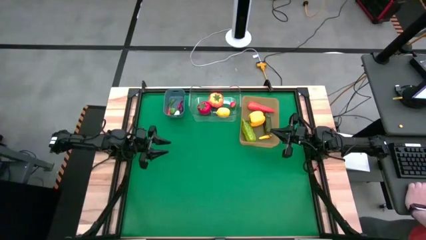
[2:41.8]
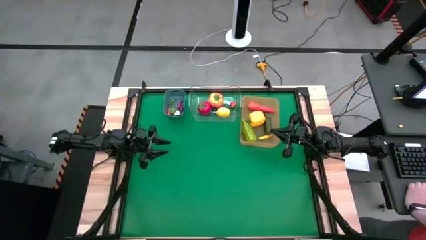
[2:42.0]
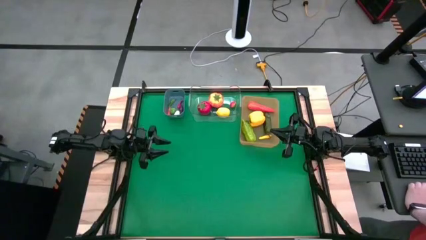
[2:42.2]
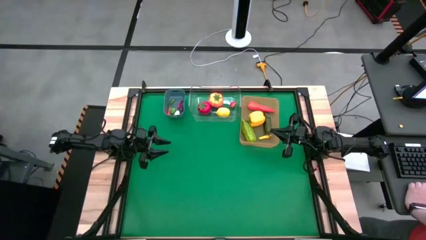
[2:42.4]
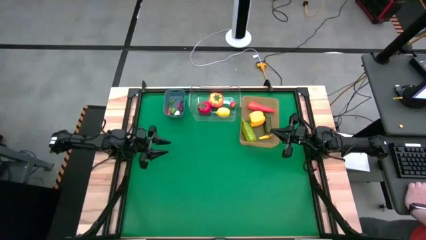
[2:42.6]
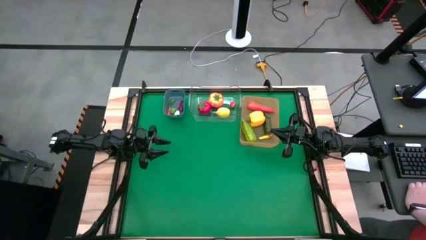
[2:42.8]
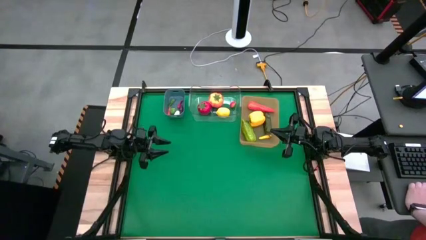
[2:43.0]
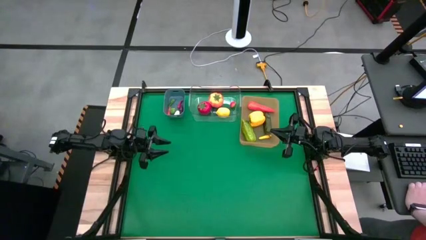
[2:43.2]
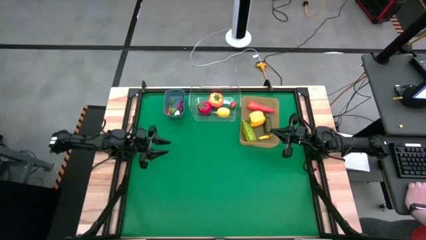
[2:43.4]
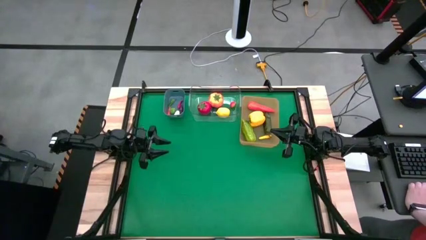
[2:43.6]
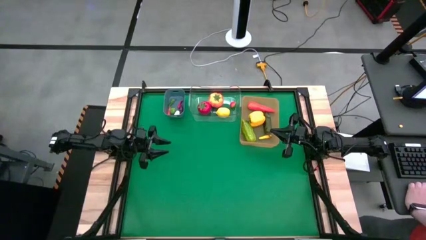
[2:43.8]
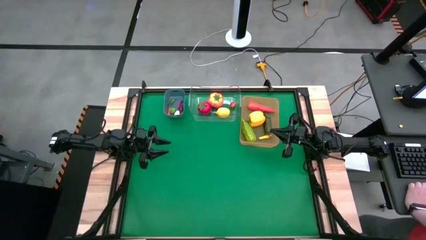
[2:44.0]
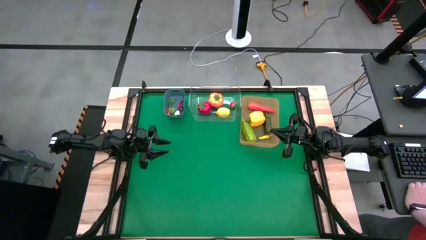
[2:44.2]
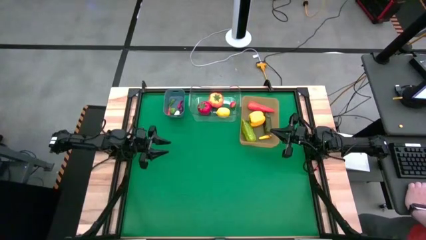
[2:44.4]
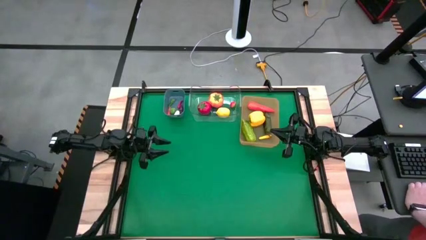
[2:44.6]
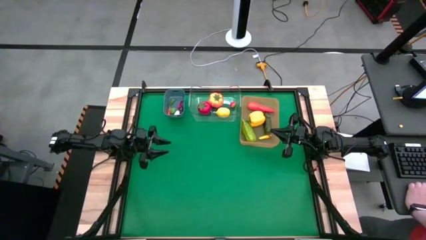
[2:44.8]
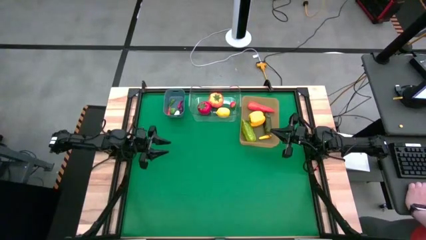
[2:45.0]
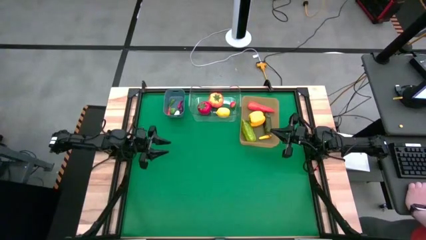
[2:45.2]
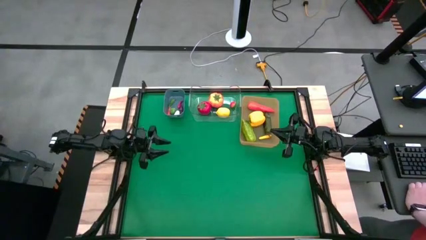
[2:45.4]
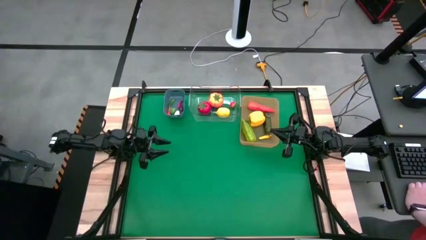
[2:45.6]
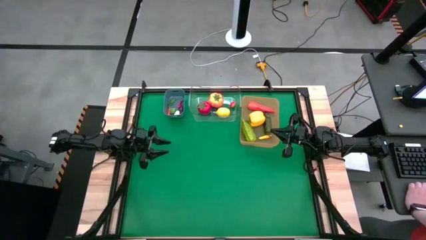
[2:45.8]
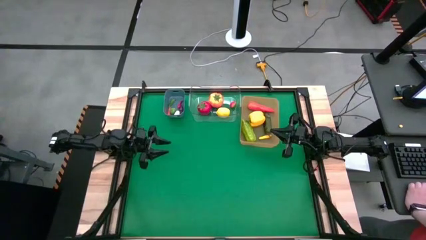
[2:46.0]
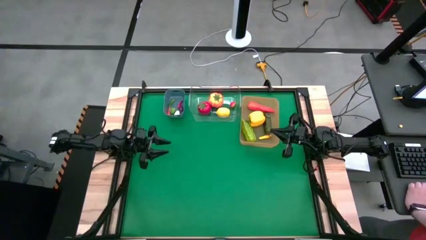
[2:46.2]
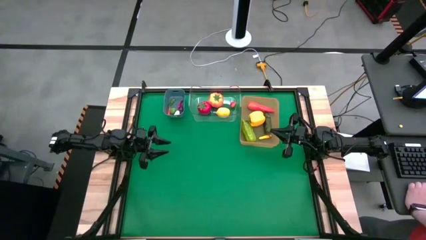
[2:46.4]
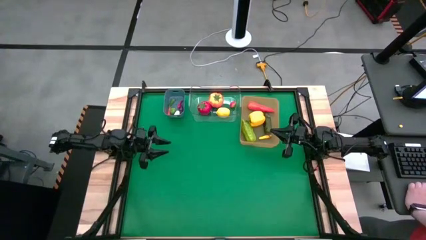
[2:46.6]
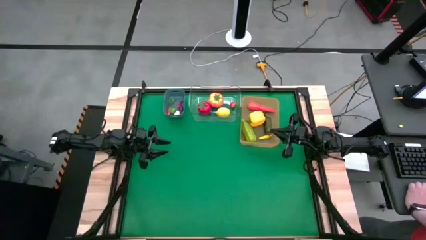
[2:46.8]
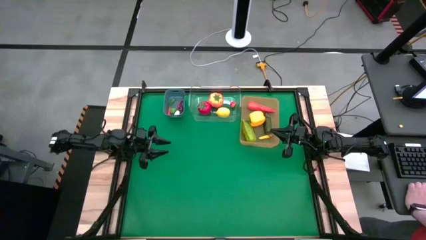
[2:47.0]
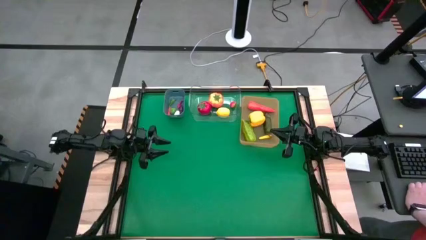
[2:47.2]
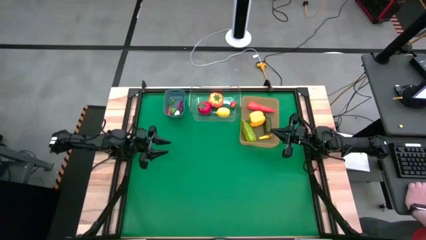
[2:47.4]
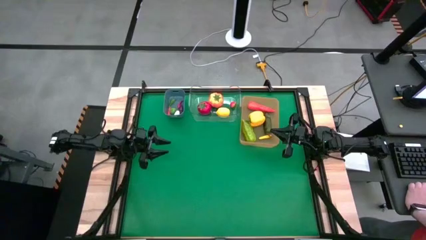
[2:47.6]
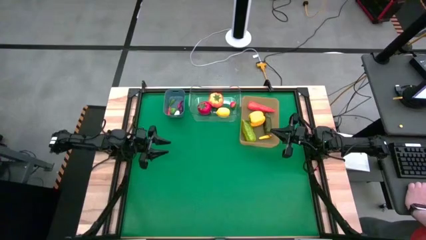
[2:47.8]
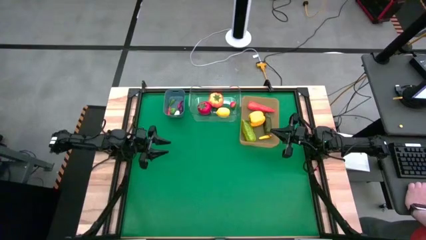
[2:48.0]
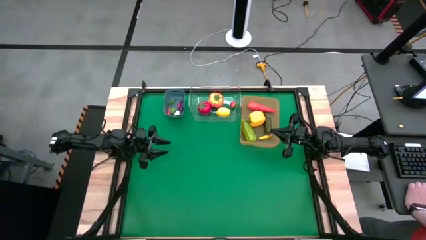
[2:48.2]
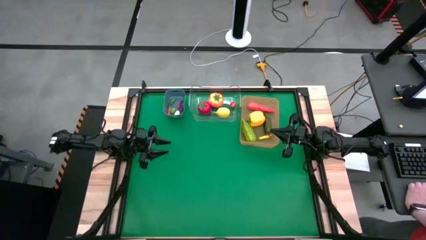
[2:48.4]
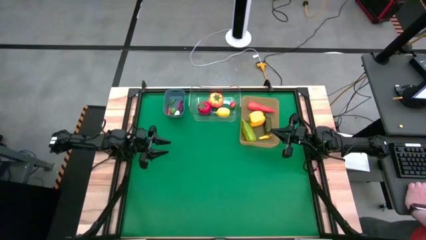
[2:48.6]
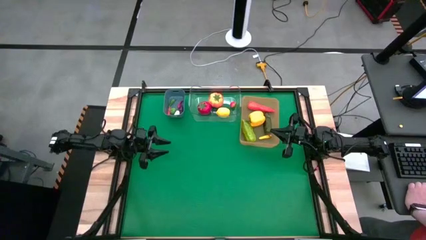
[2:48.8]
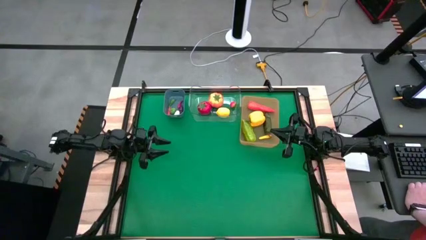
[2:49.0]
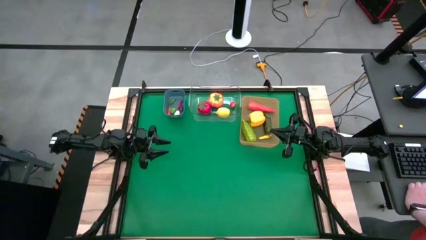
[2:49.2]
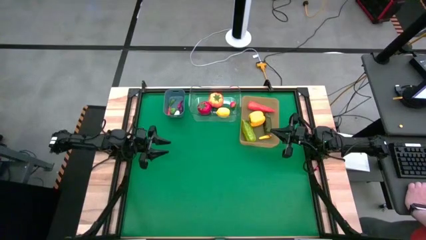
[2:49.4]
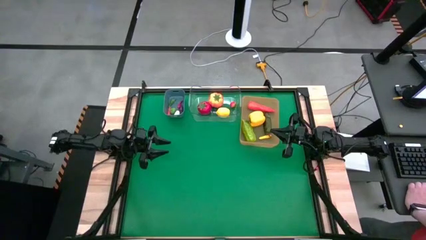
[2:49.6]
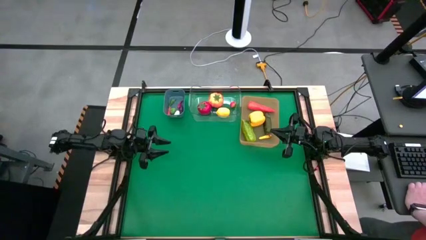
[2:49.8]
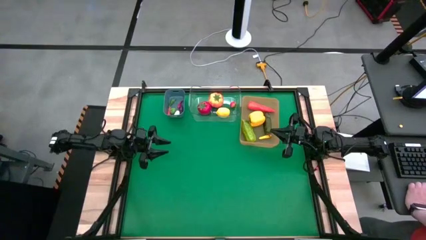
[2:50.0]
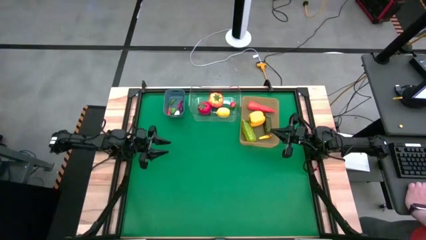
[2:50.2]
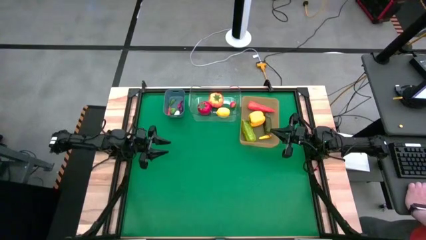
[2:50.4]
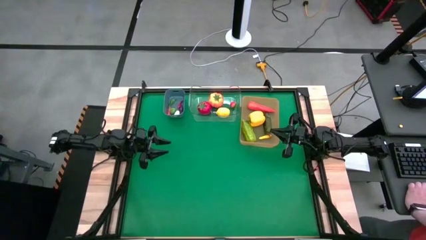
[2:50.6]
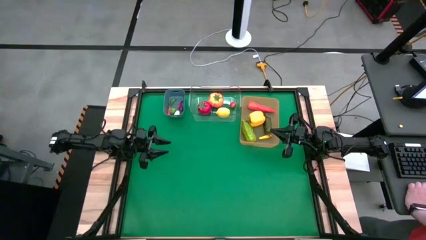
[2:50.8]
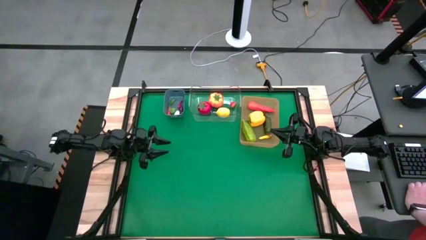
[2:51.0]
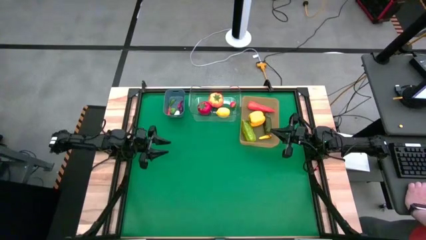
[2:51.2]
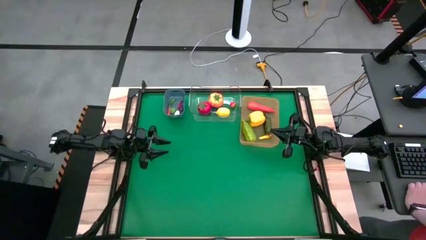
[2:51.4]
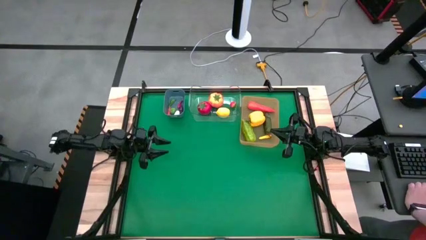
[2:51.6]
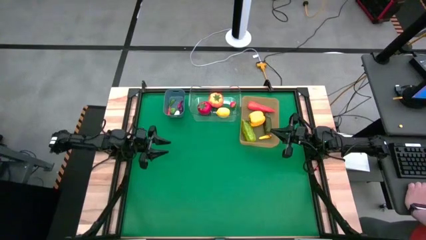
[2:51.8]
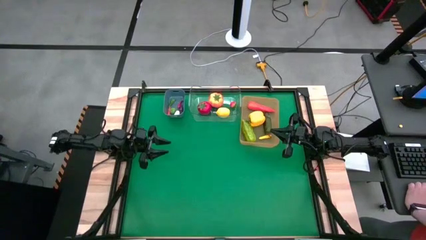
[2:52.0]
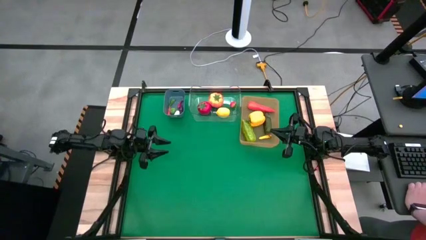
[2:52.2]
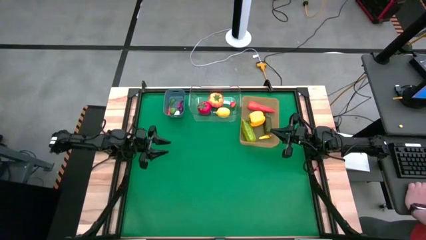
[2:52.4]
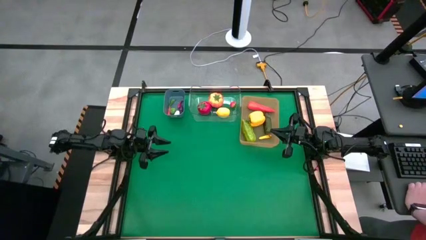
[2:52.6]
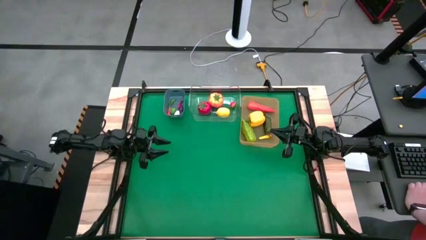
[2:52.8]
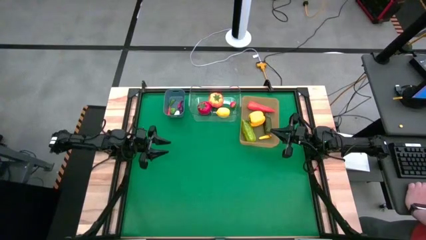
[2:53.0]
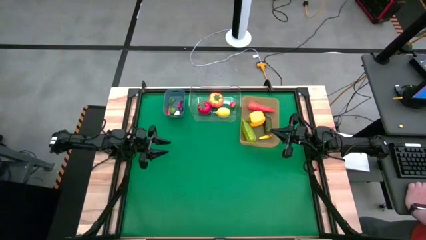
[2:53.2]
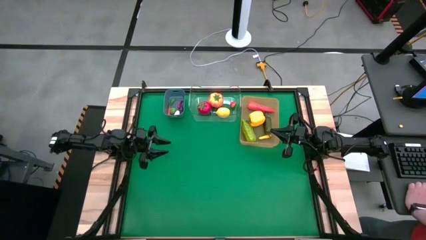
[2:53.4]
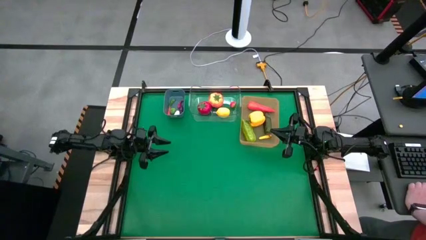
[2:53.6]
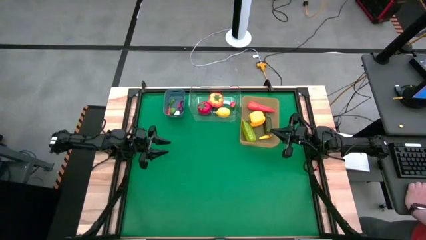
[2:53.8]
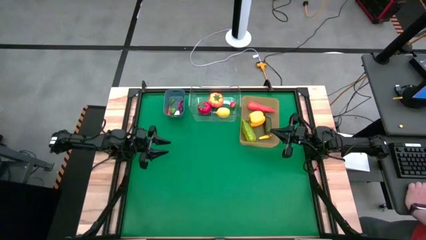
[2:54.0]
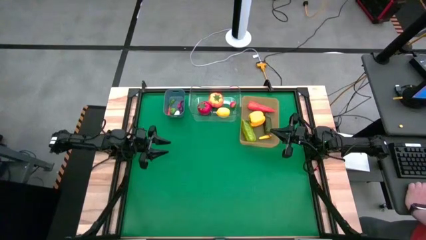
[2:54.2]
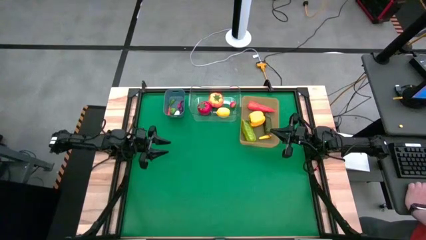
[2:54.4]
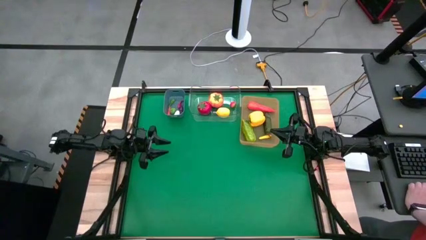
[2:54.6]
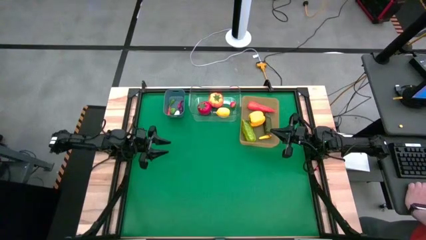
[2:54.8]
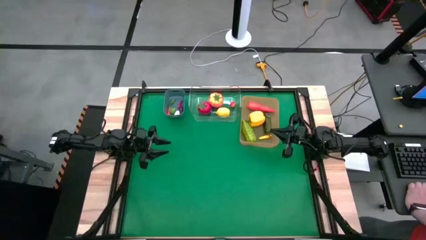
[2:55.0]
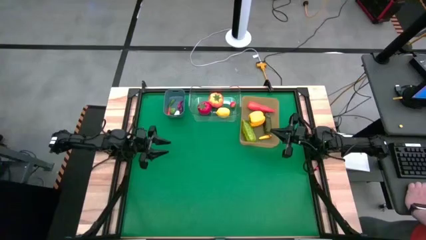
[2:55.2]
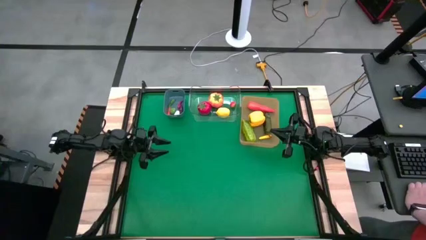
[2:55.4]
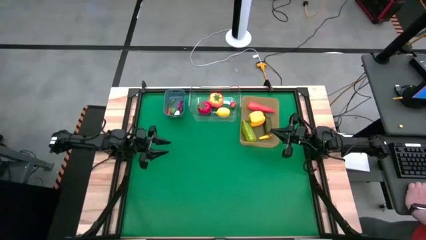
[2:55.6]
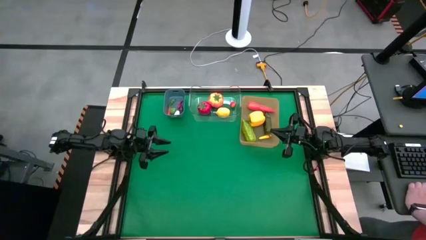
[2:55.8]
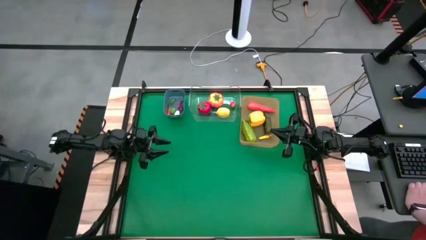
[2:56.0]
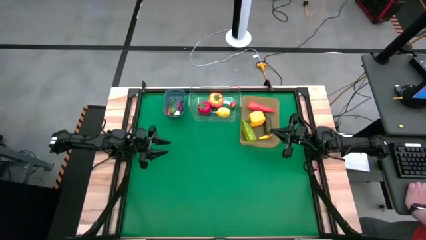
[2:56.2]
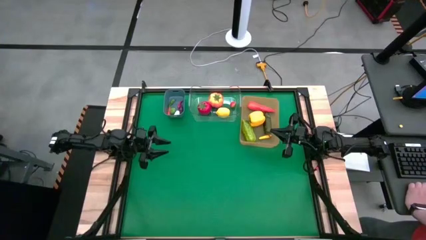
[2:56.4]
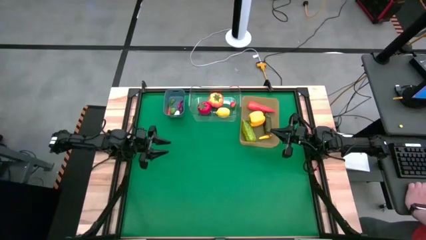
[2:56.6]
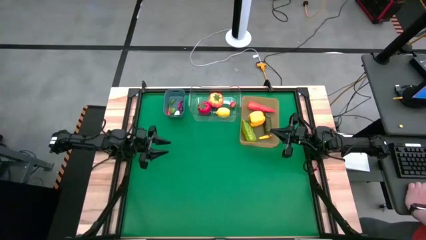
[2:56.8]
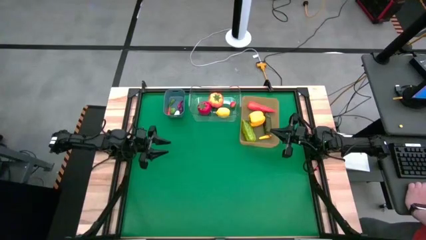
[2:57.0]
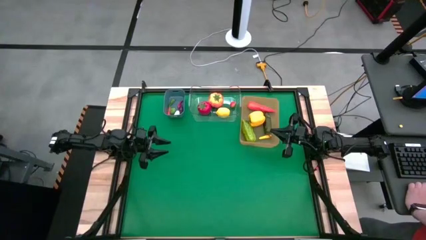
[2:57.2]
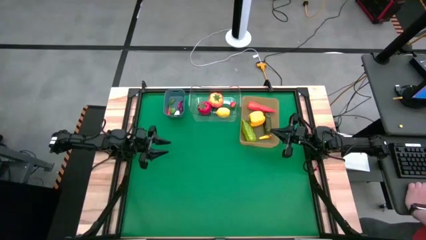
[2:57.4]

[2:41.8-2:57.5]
Task: Sort produce into baskets
Return to Home Position
